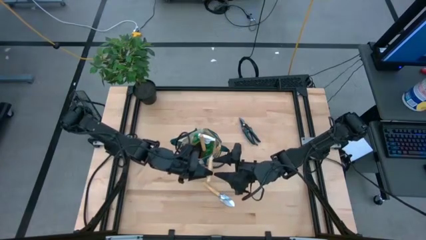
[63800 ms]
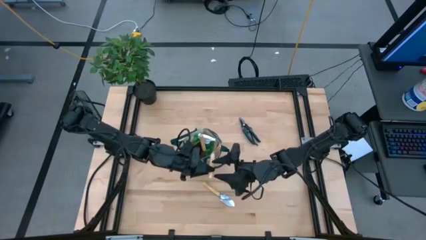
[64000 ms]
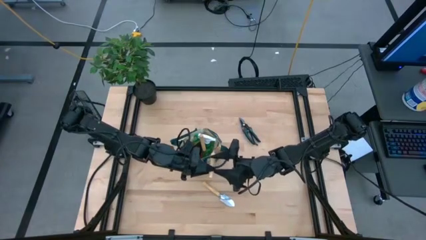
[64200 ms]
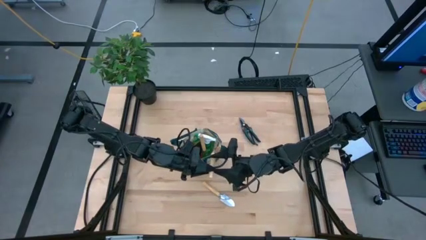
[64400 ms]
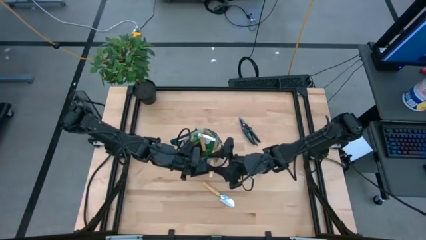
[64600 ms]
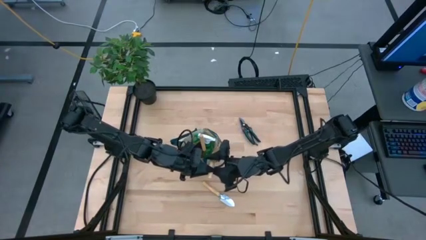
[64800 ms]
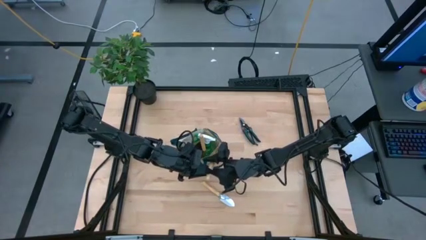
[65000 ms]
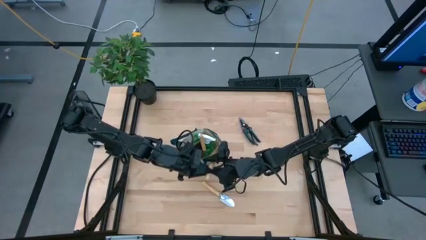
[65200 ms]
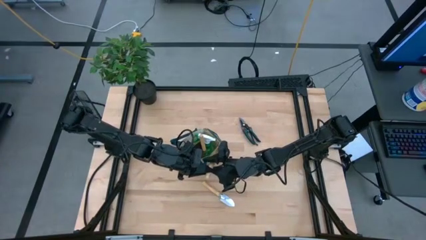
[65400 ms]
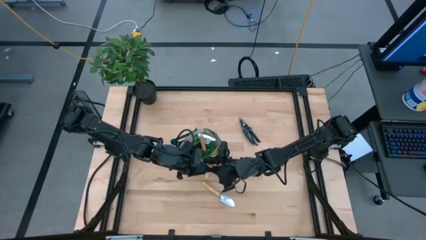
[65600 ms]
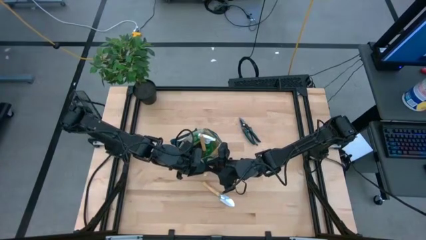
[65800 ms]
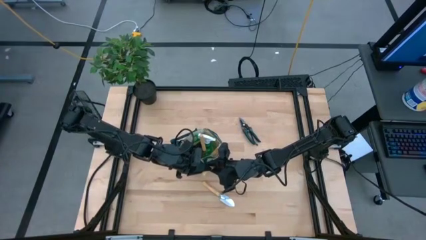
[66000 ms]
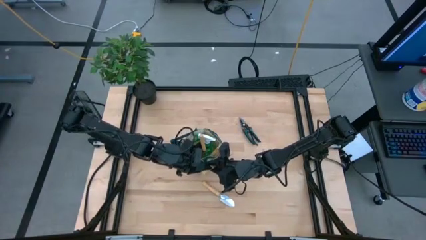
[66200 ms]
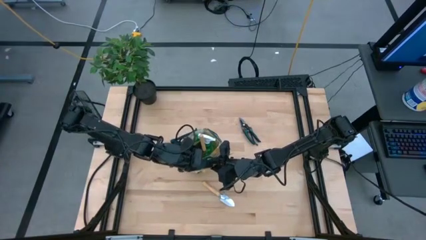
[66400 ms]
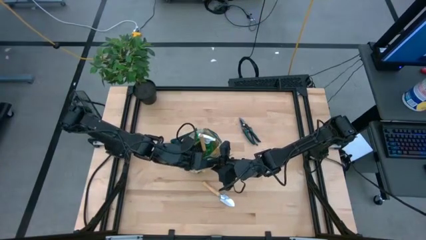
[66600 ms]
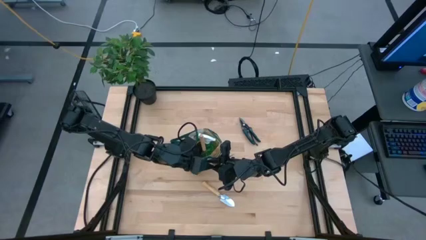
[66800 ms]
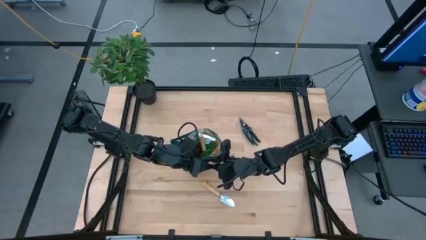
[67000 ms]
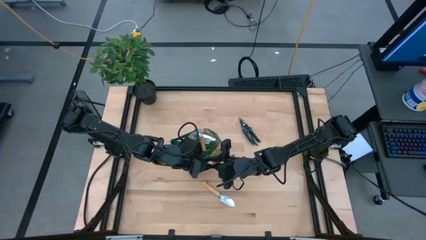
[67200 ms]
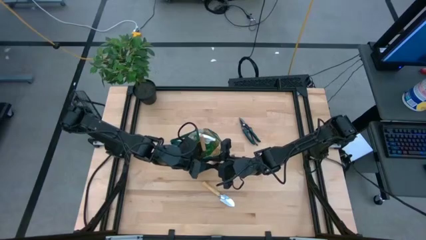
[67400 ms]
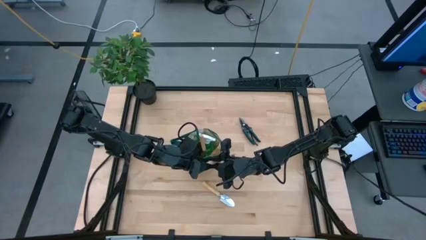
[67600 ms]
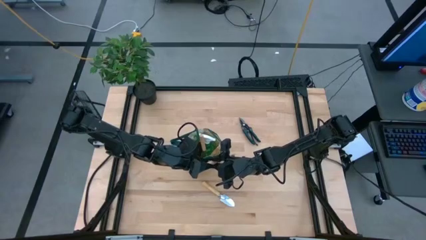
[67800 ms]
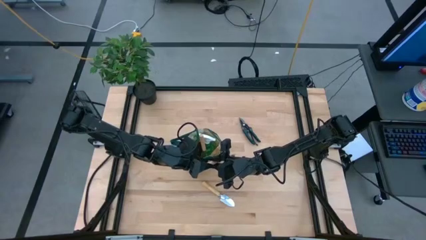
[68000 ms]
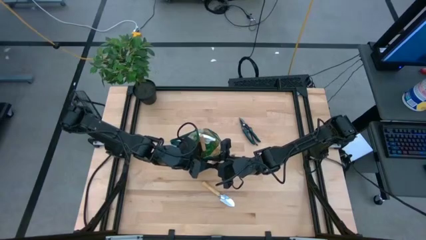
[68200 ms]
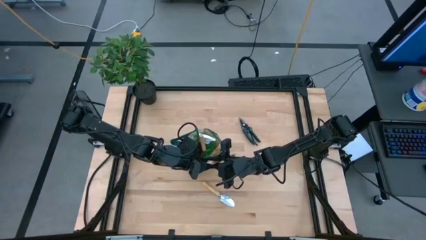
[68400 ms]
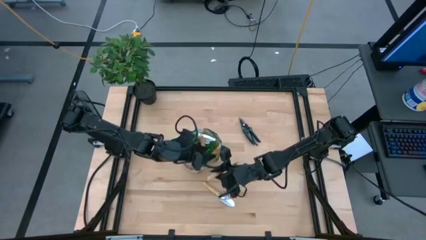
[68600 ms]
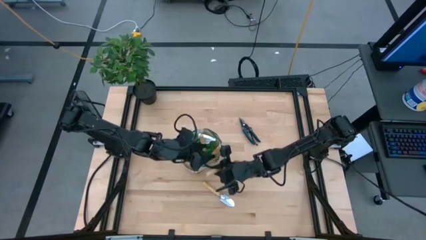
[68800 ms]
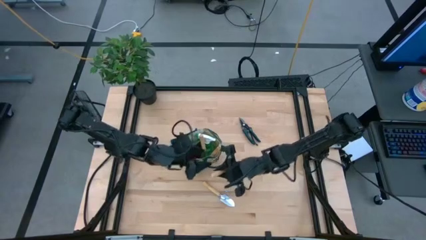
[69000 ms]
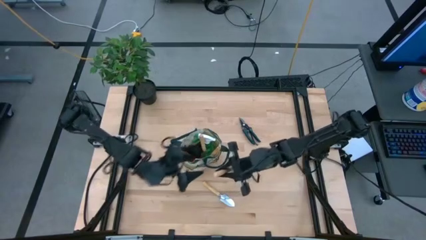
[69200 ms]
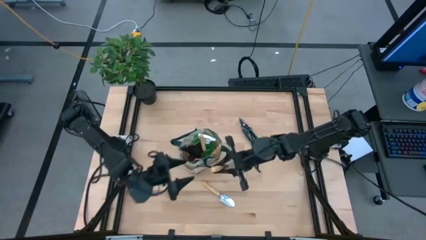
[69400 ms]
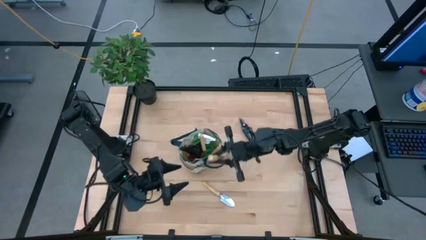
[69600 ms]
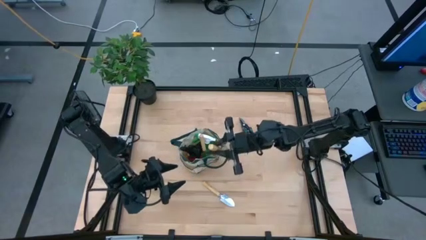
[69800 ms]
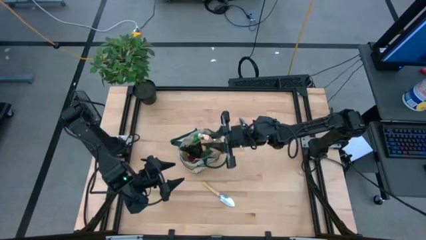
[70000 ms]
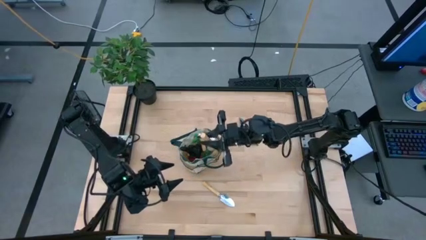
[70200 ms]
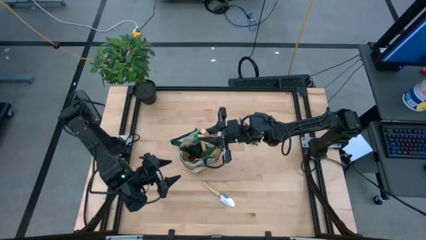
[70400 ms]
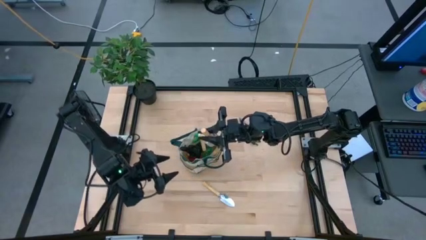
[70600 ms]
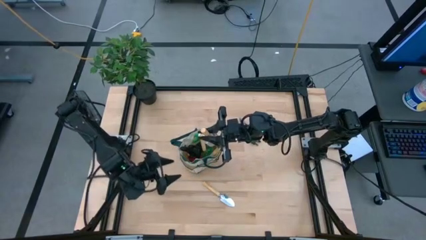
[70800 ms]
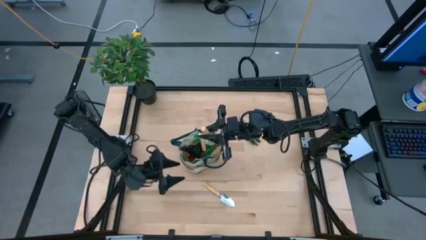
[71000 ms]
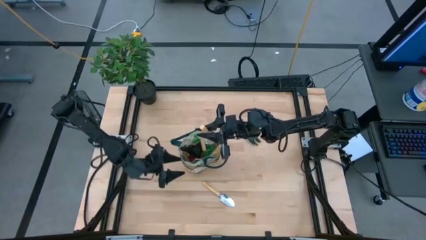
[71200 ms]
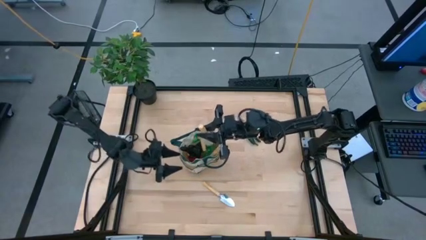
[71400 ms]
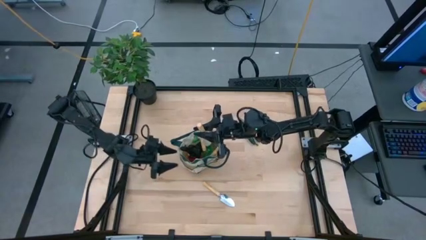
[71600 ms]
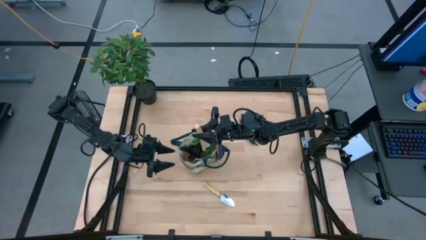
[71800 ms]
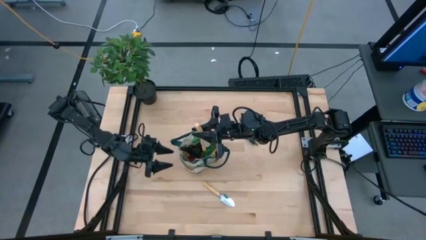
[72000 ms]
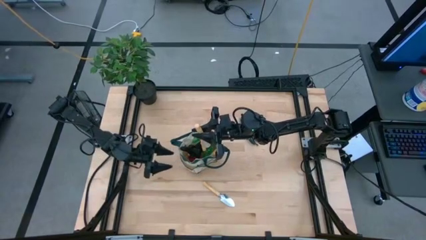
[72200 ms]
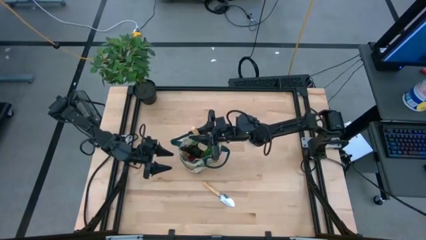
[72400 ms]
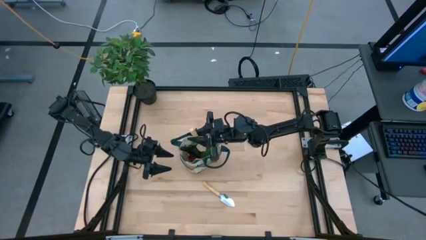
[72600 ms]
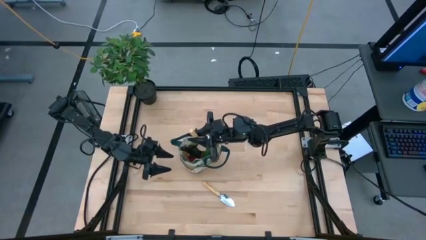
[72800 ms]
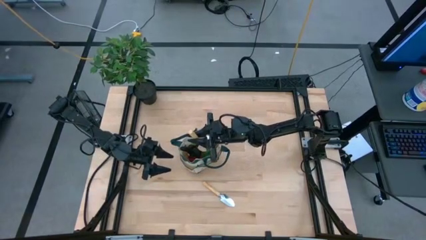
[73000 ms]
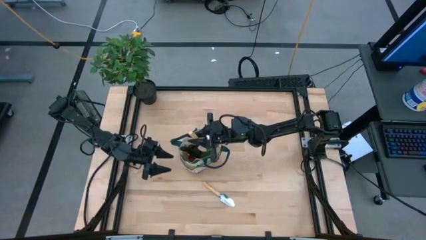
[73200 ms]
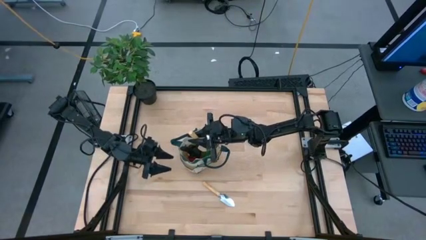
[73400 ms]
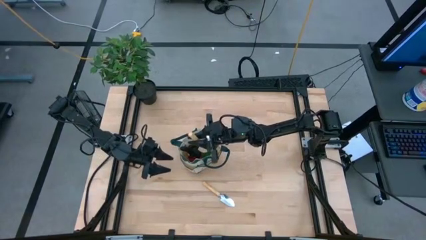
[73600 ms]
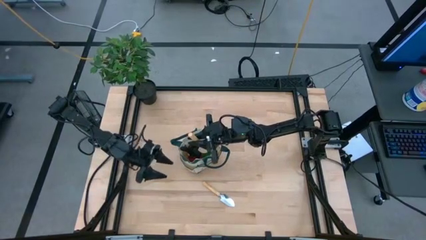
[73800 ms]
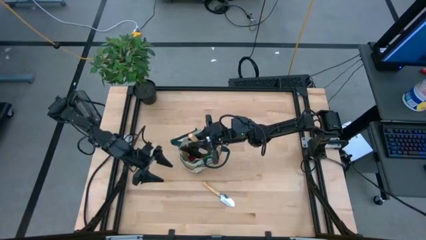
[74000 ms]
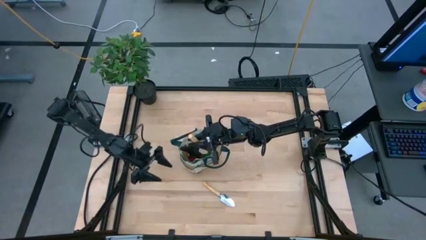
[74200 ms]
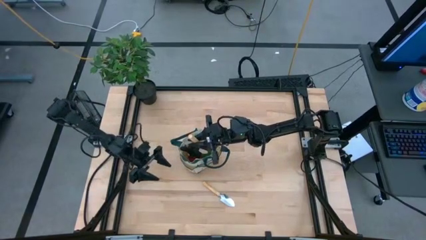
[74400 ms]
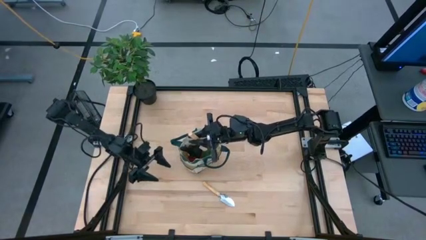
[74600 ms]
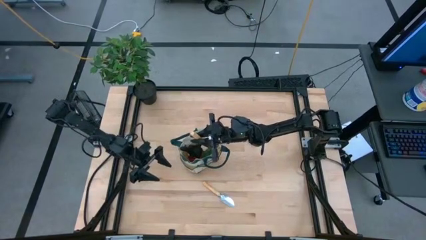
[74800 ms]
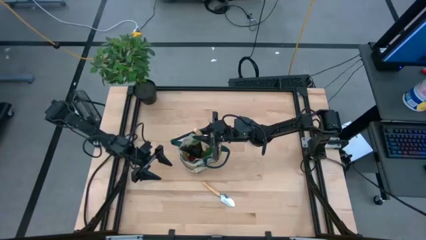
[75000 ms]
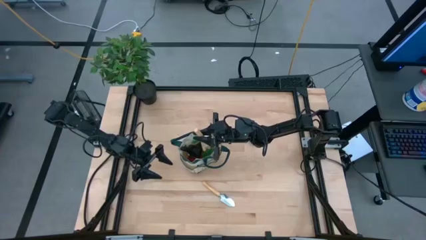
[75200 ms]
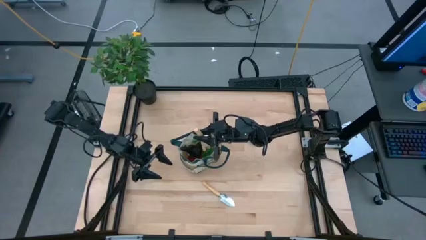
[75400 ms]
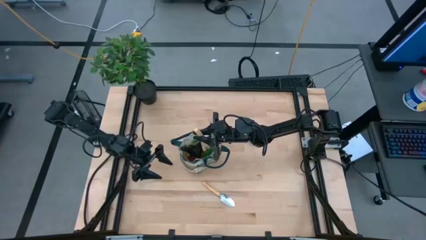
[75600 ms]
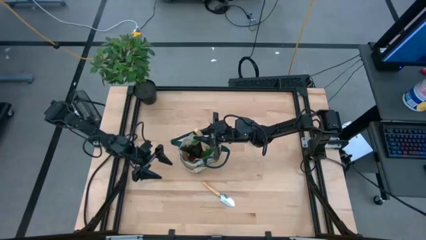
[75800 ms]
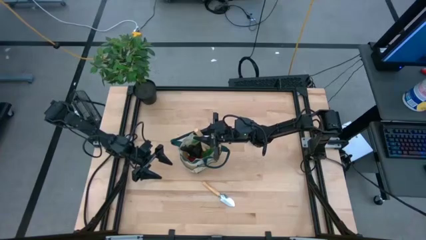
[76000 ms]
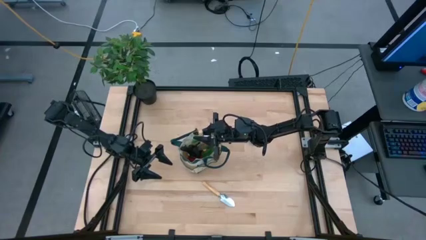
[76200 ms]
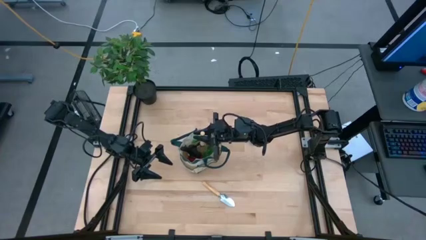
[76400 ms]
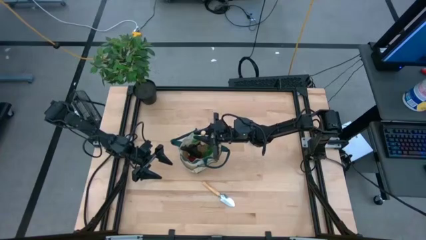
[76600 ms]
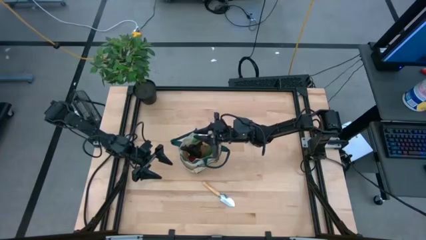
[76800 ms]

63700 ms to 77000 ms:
Task: Pick & Place Garden tools in Gardening bag
Put the left brown trowel into the gardening bag
